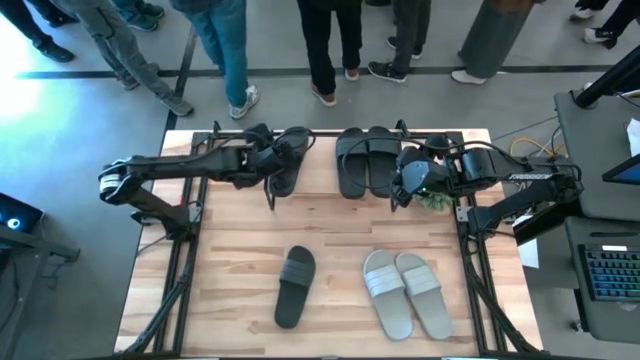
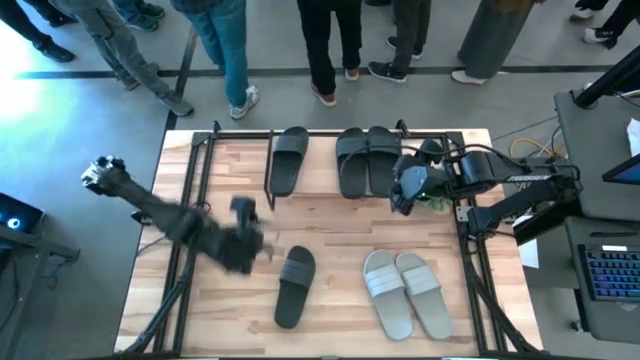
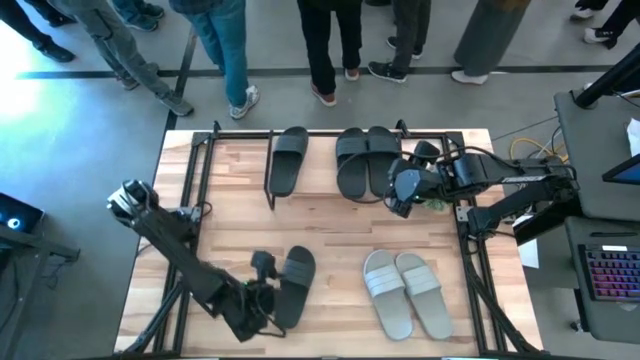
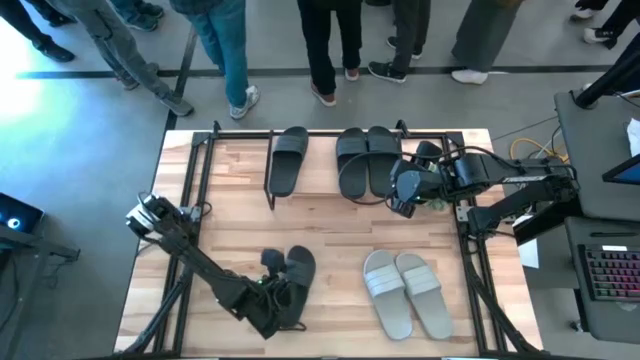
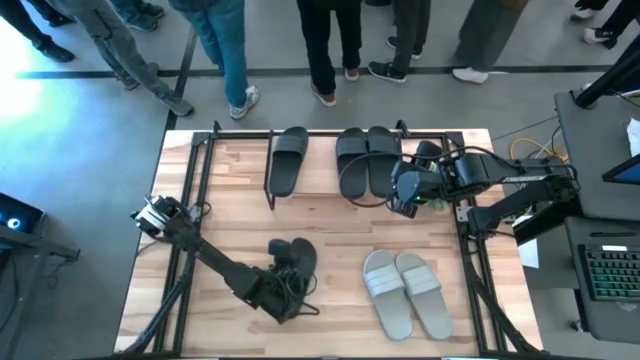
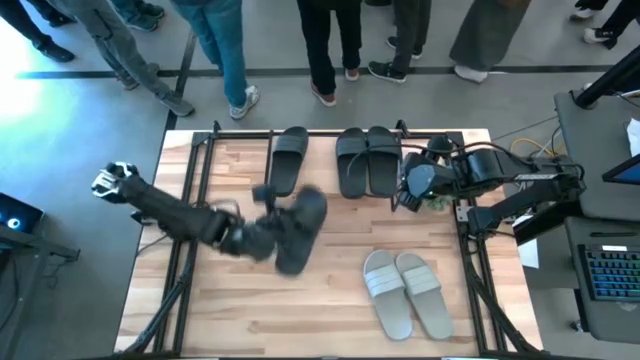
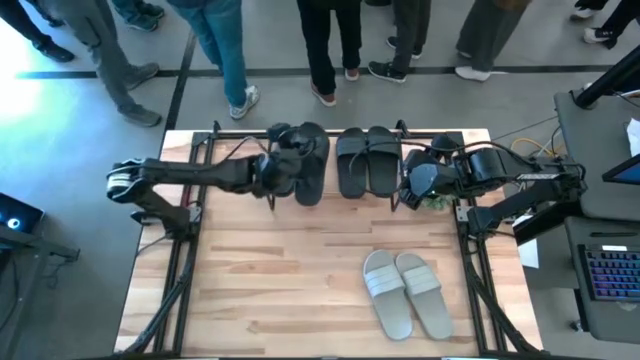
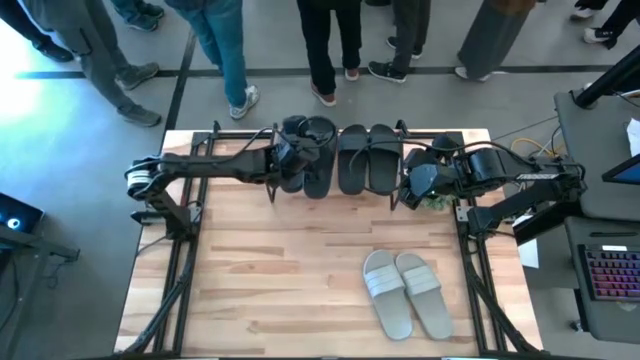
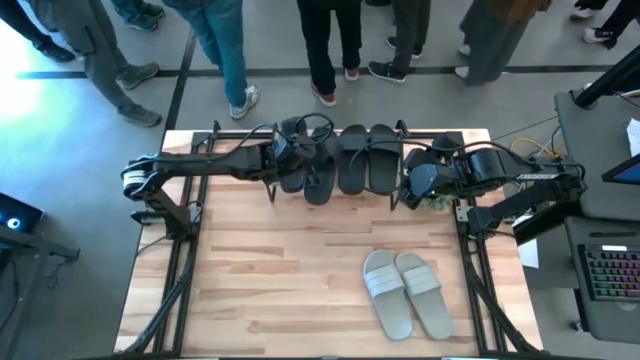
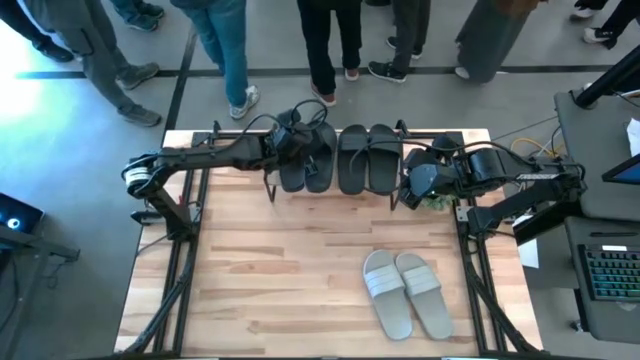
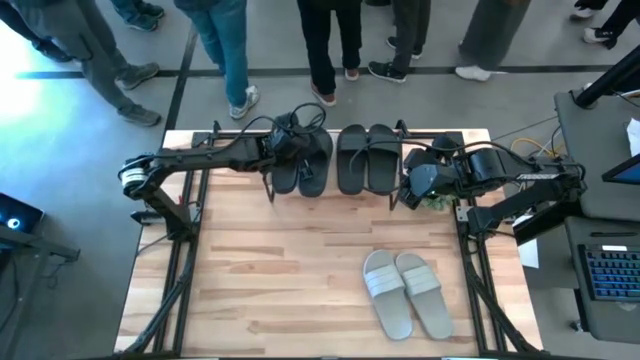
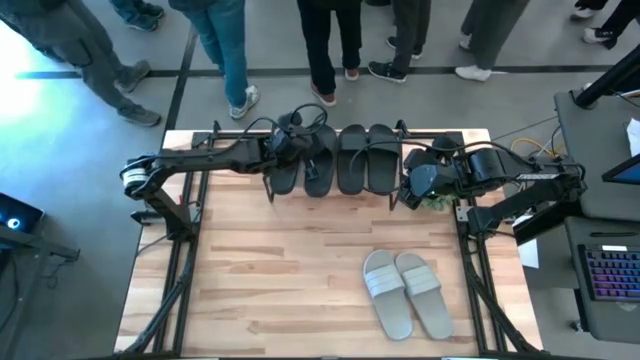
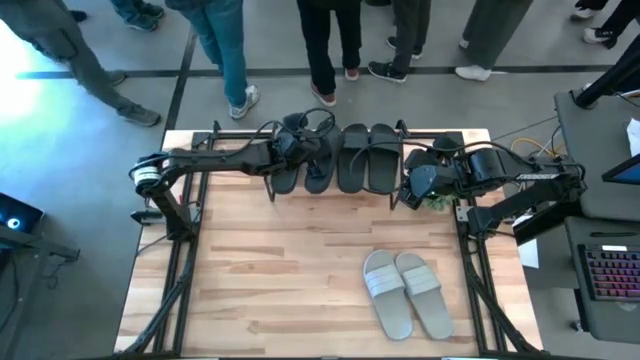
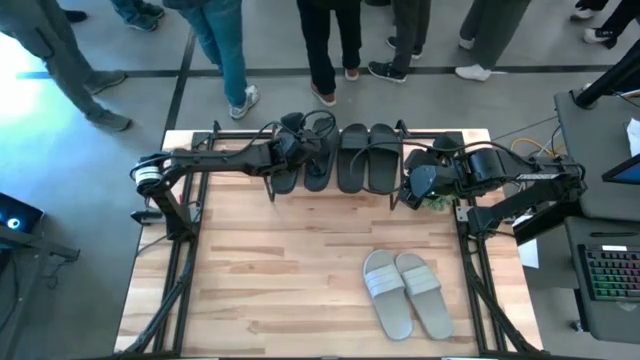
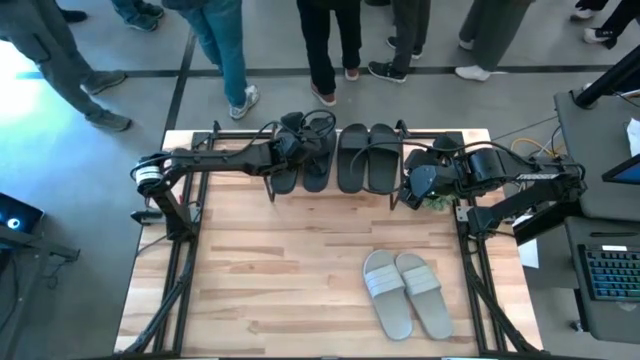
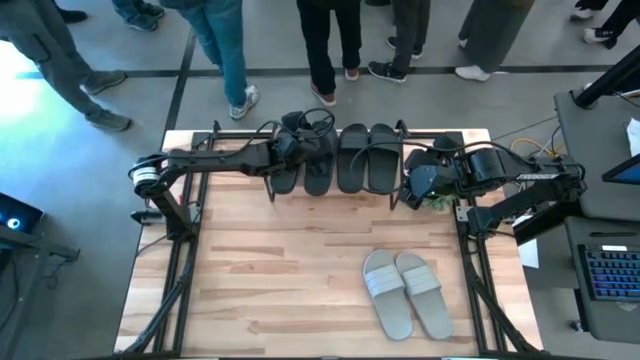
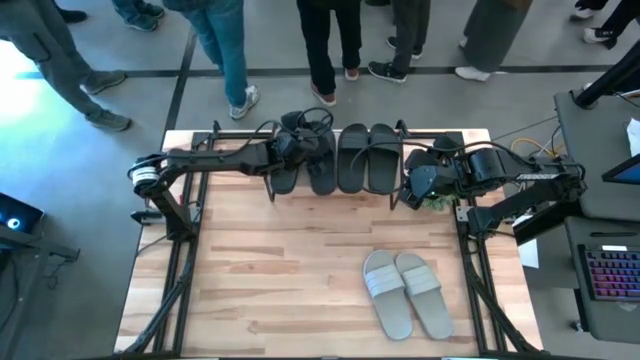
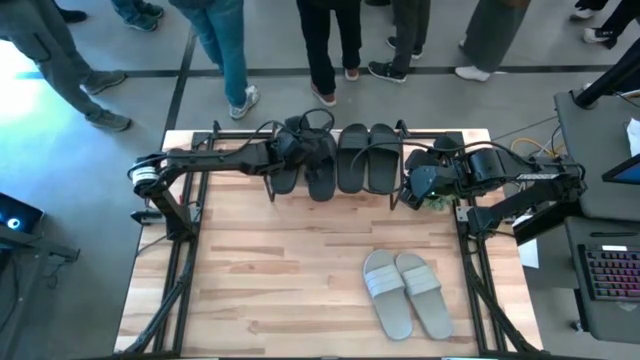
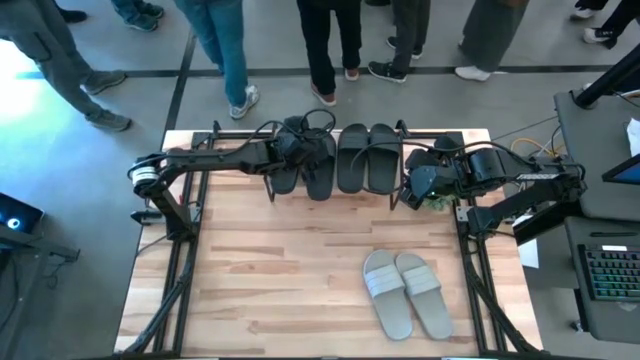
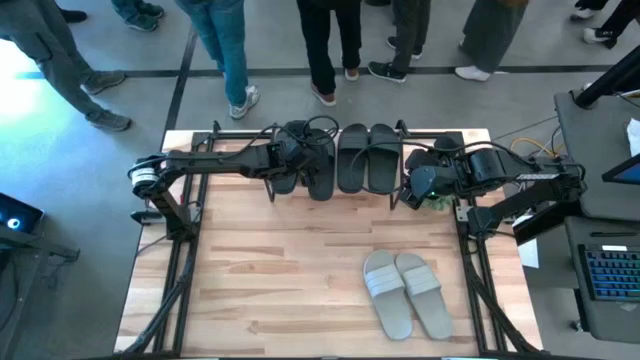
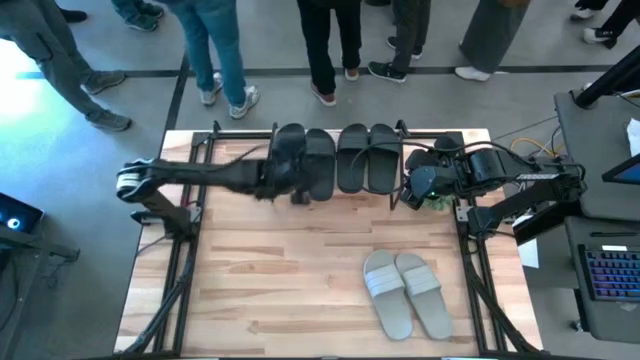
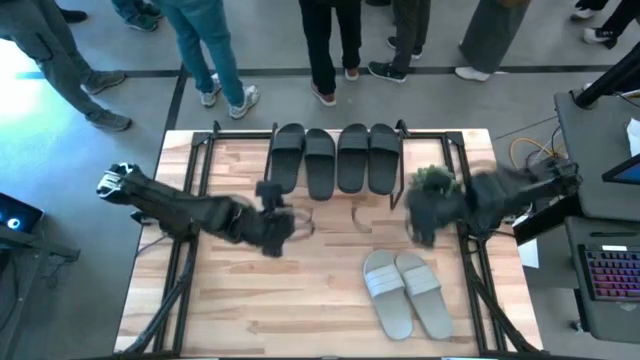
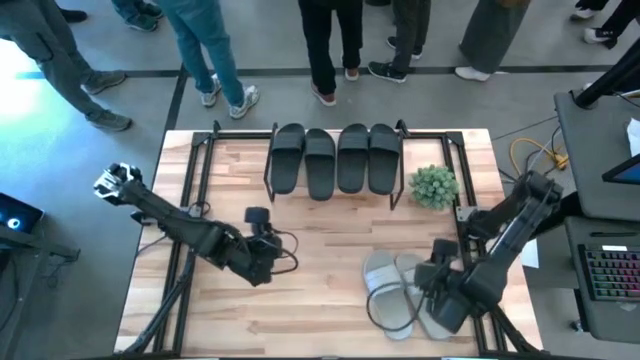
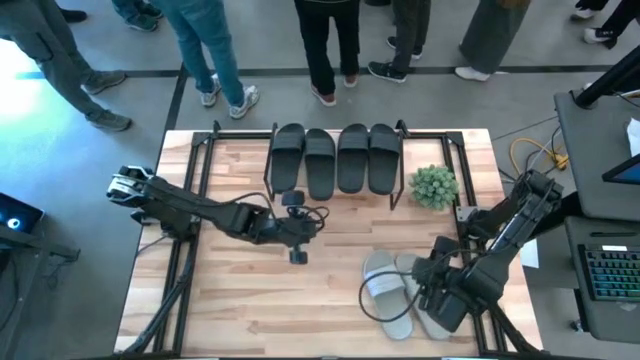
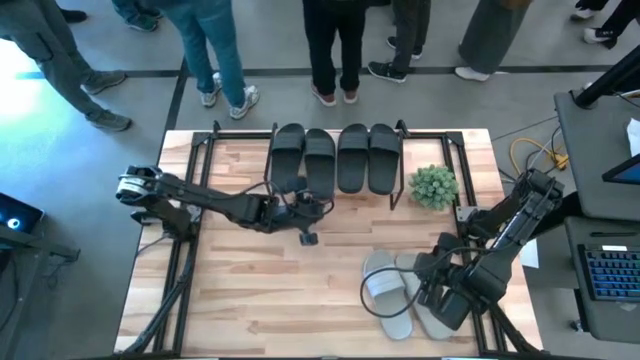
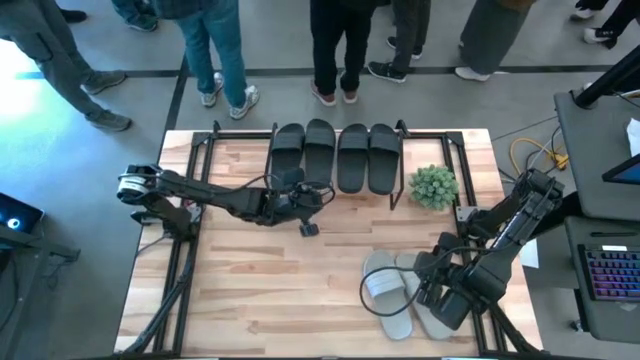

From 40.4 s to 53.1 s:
Task: Pick and place slides into the shelf
Put the black slide on the shelf

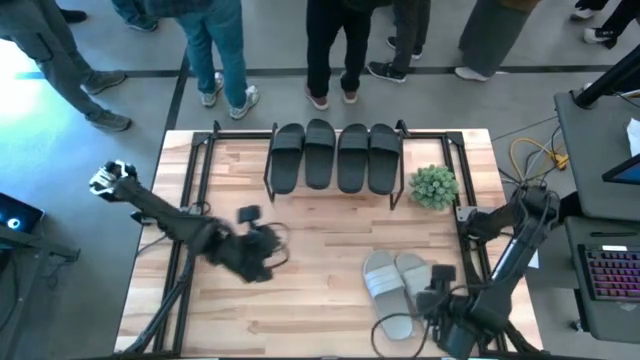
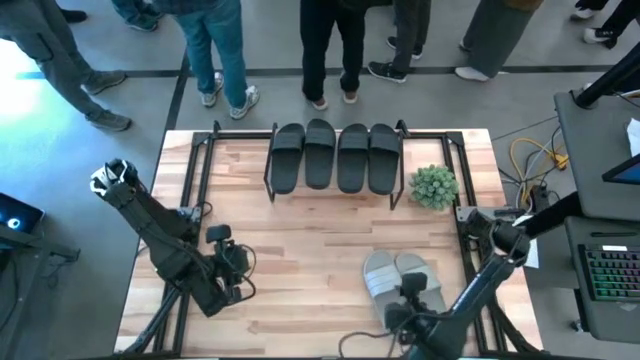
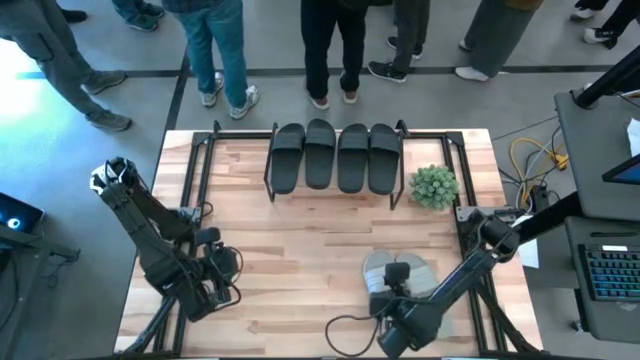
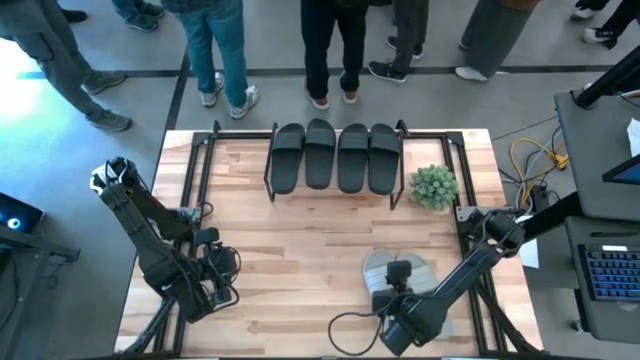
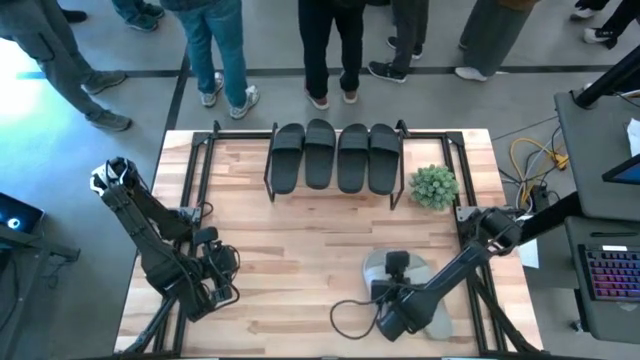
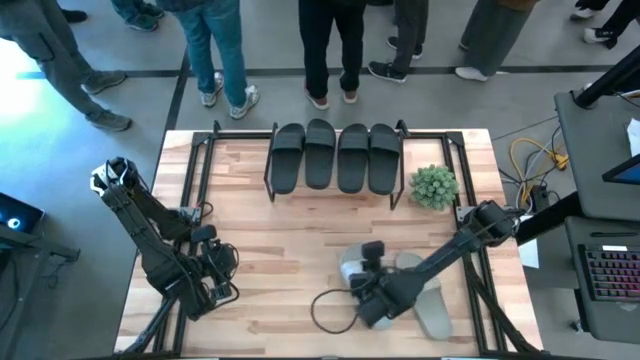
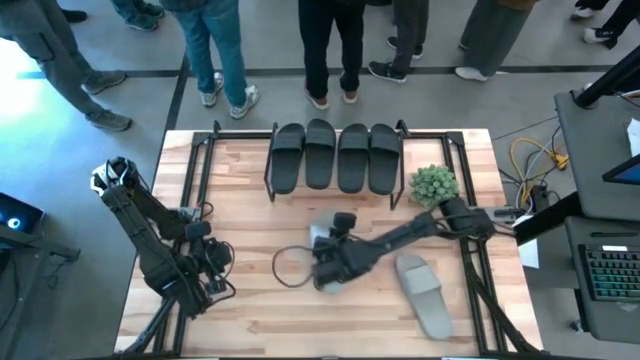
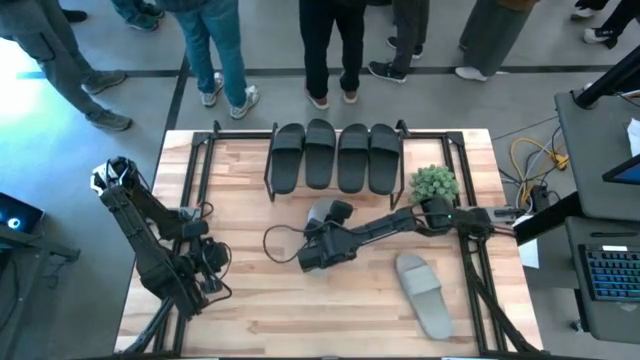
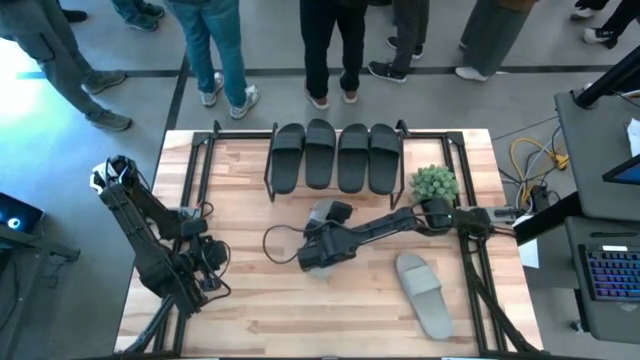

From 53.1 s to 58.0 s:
Prepare the gray slide

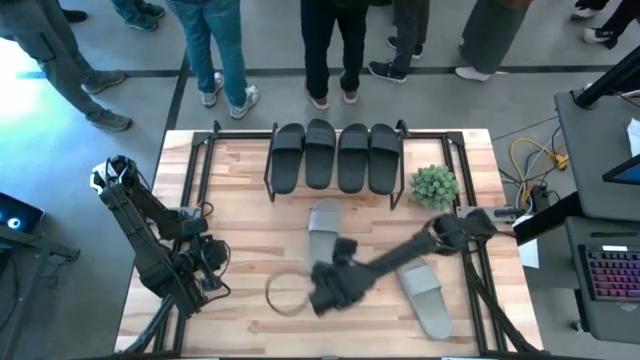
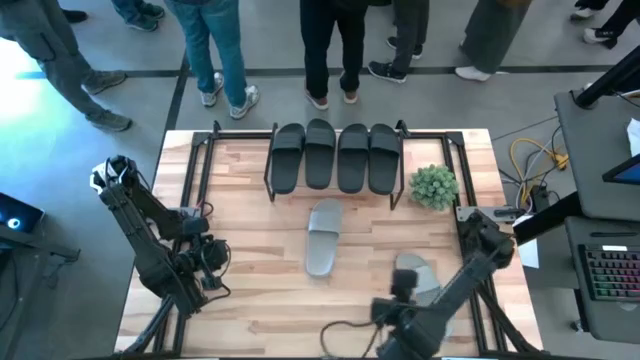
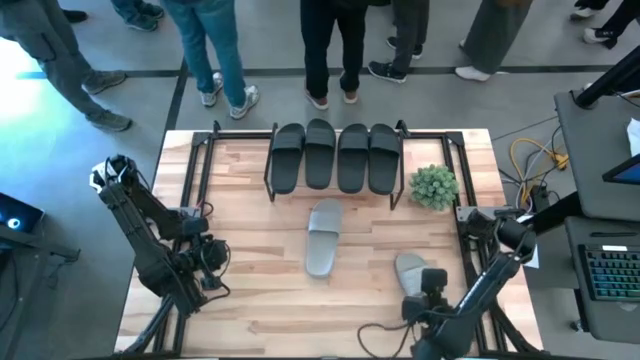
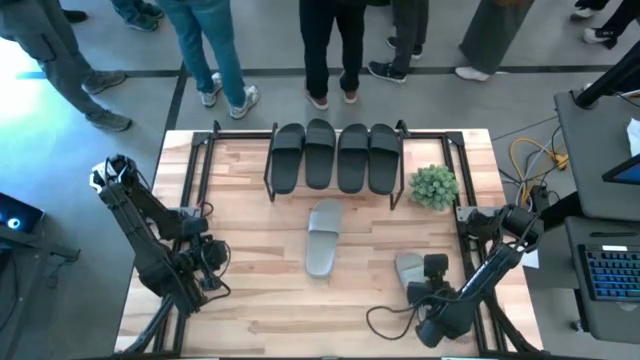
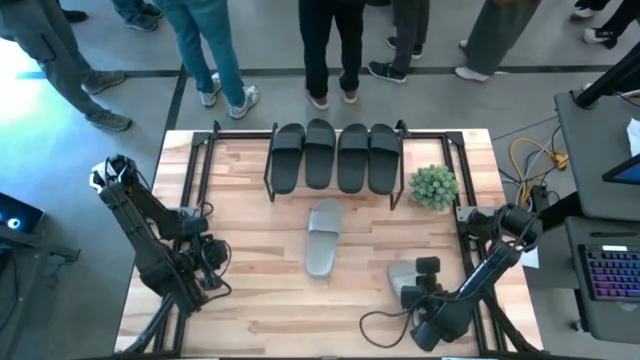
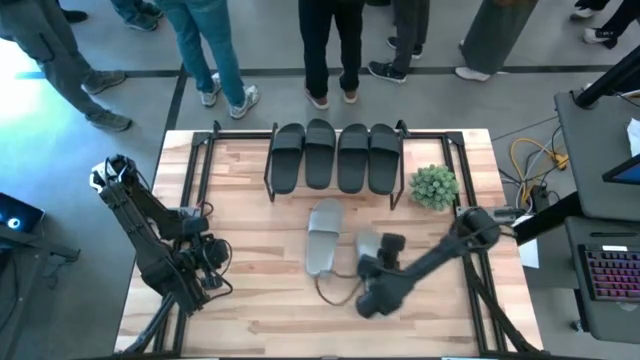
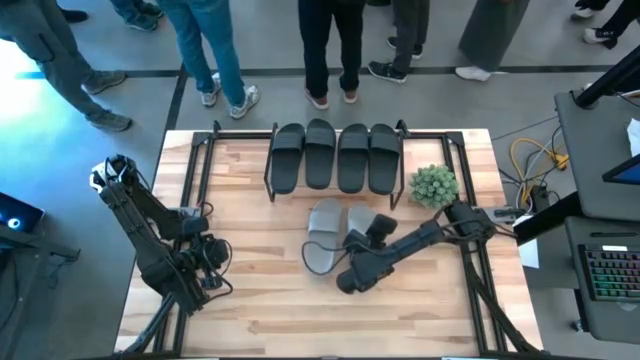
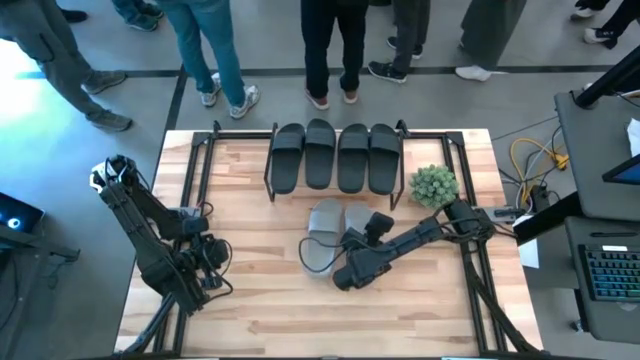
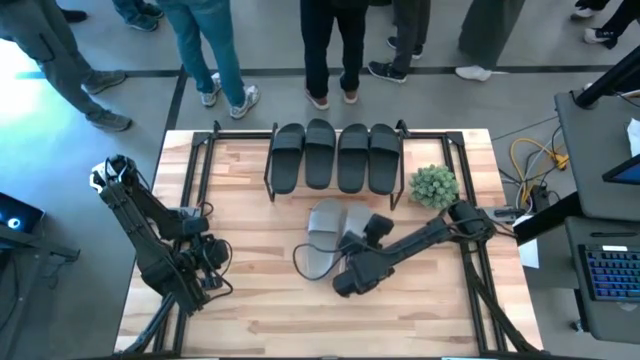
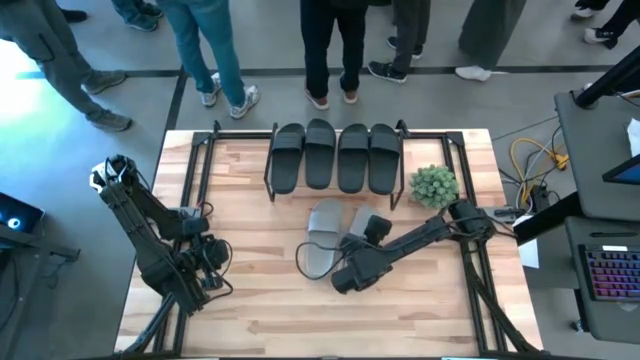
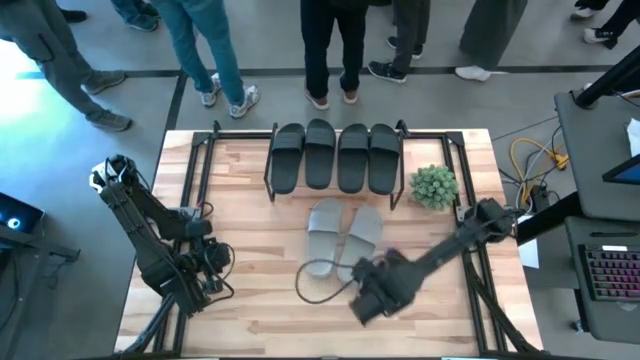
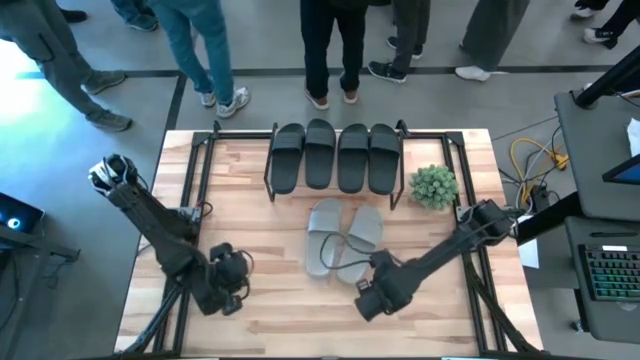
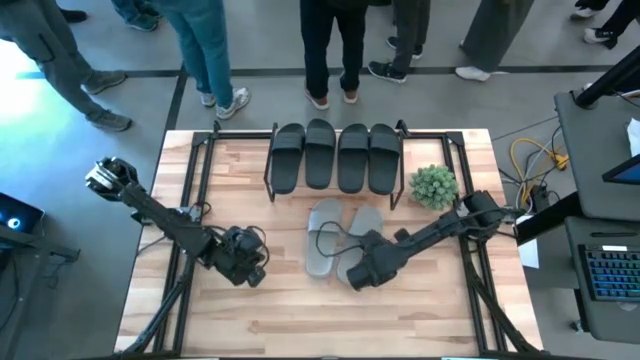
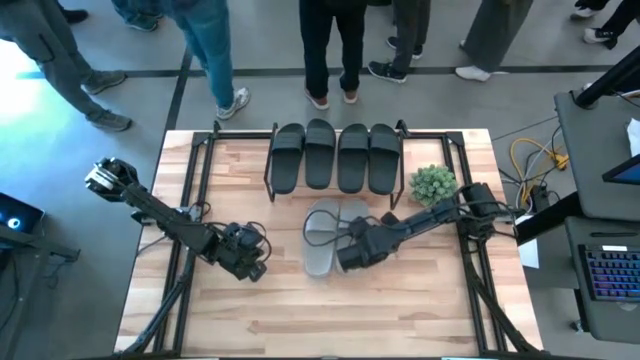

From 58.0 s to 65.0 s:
Prepare the gray slide
